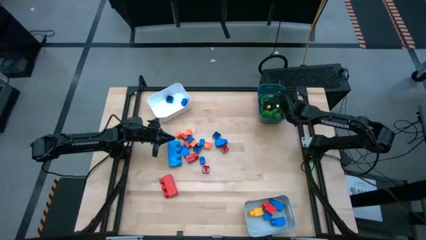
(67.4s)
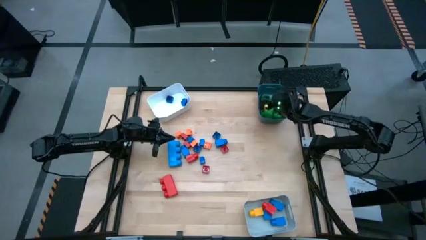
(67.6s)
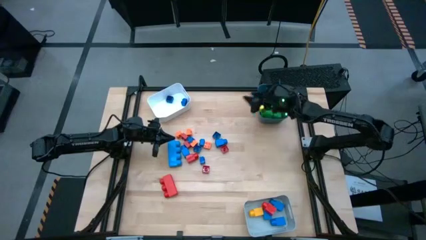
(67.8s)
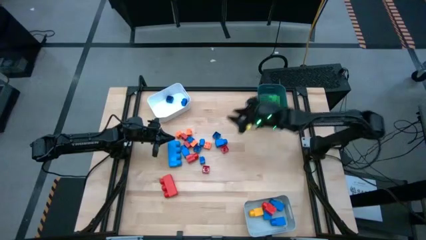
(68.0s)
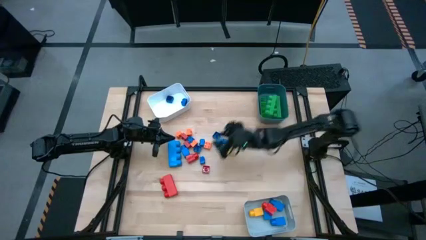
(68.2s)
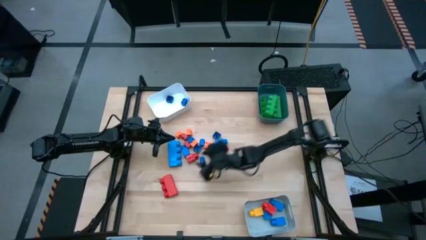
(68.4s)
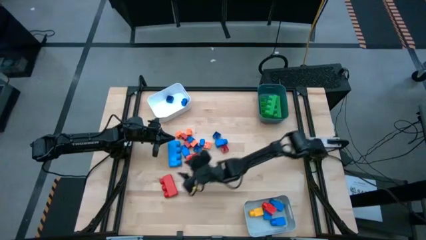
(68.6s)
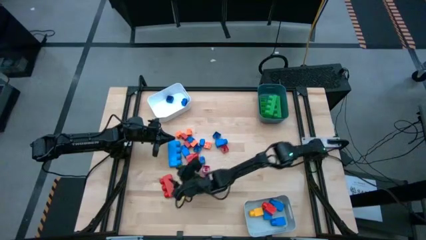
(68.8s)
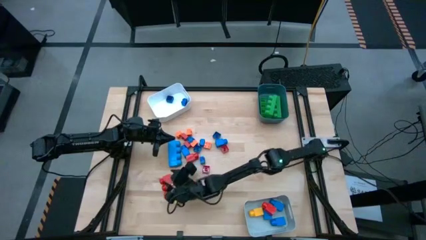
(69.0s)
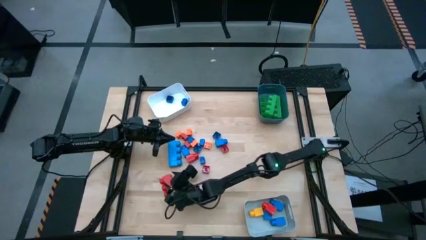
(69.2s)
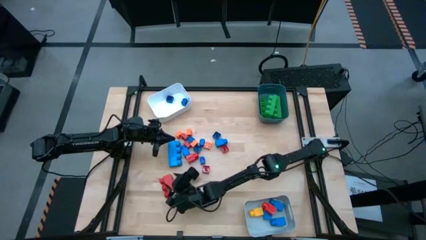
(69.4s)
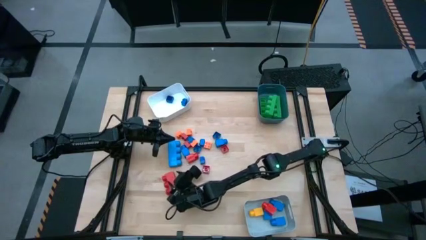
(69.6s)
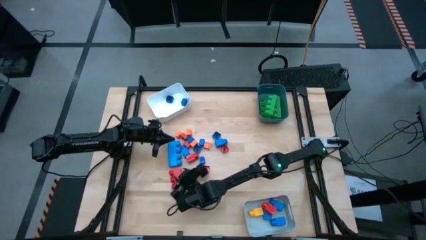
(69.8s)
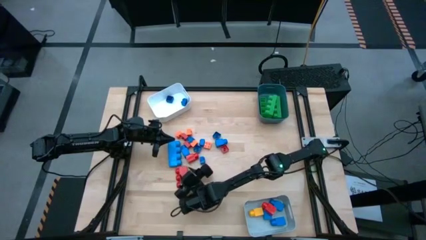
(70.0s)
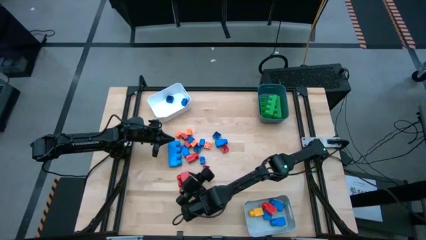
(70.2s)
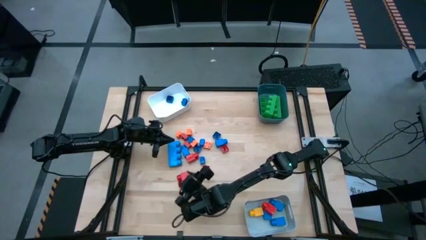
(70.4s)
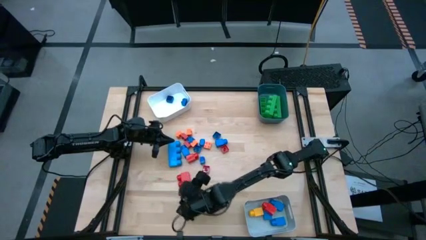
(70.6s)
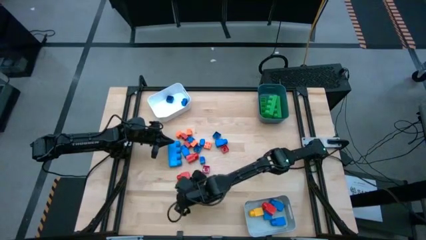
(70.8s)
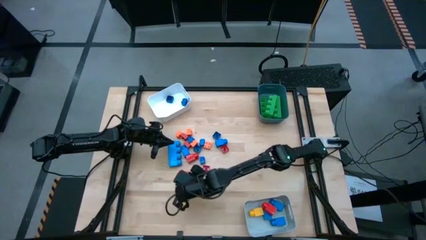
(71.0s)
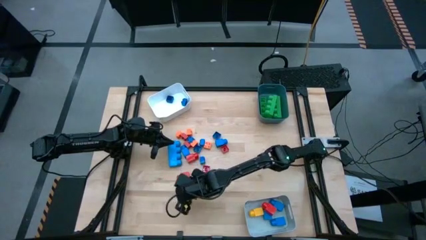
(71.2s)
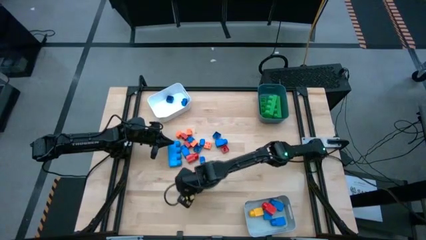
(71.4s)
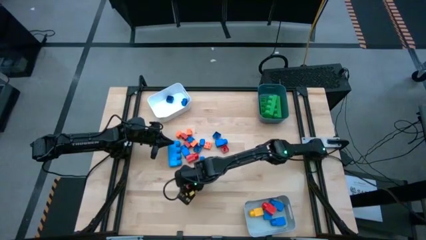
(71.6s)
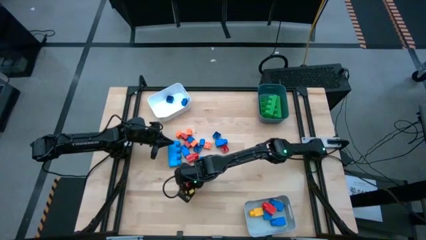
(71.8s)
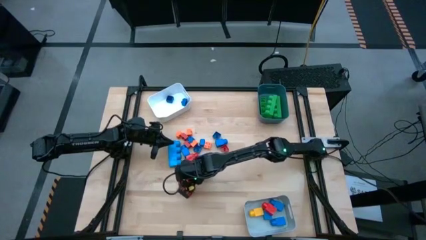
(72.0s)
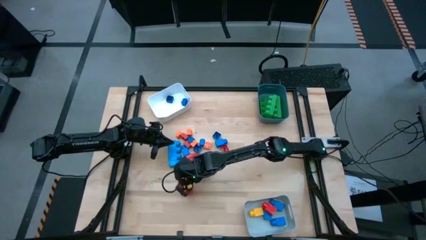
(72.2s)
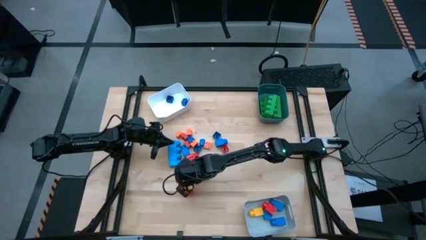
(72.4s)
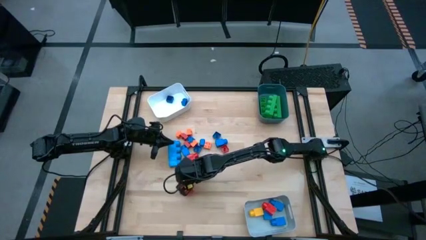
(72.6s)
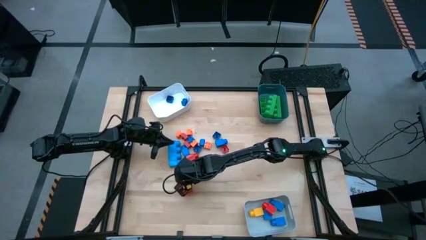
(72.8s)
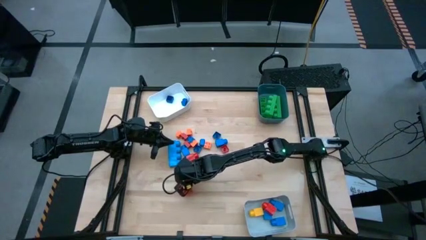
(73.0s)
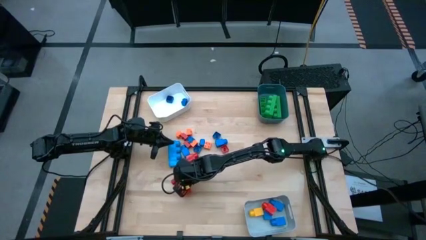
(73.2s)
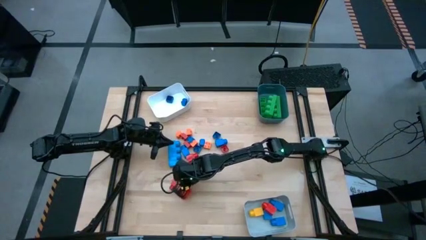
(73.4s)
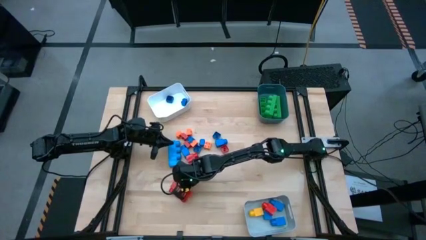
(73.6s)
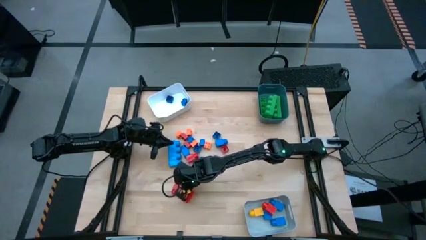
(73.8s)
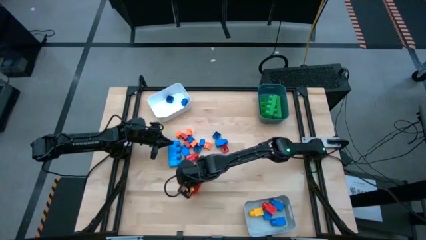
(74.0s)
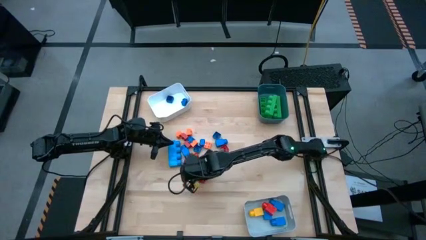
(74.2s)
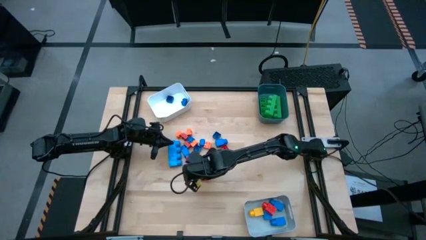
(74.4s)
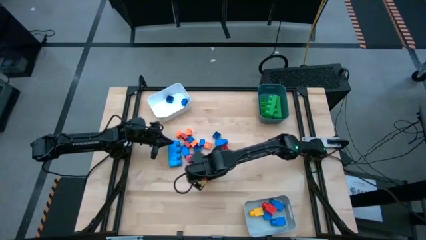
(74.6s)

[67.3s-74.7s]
Task: Sort blocks by size
Put the large 4 stud red game piece into the blue bin

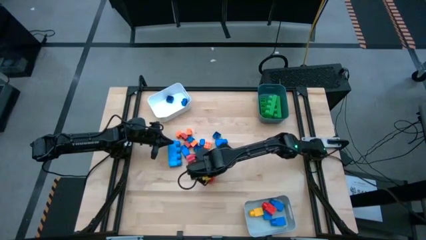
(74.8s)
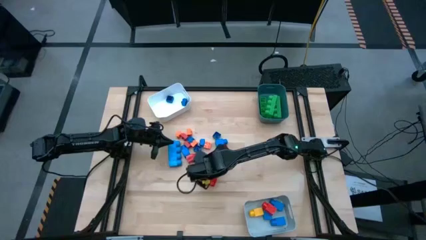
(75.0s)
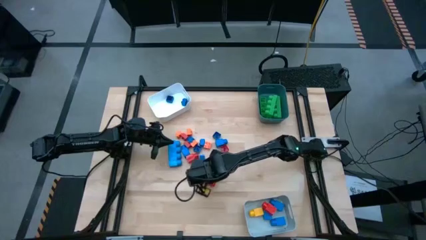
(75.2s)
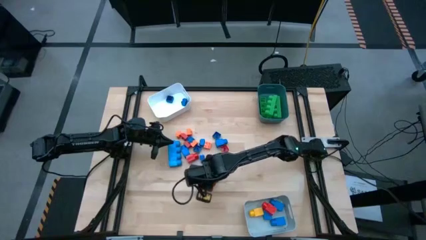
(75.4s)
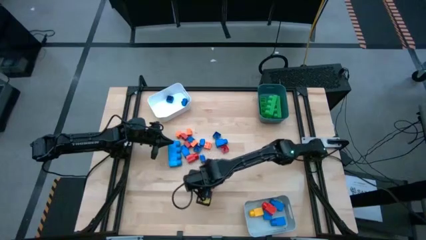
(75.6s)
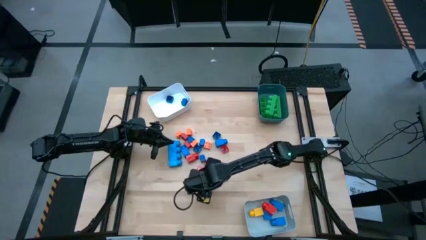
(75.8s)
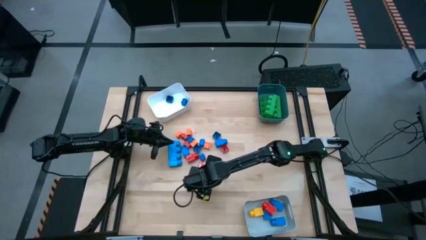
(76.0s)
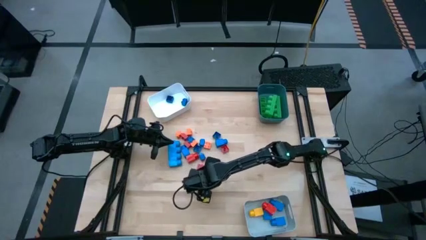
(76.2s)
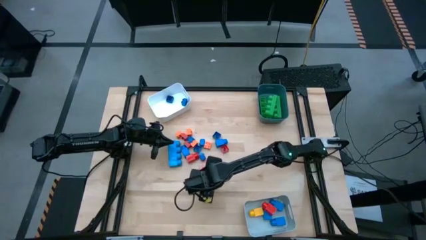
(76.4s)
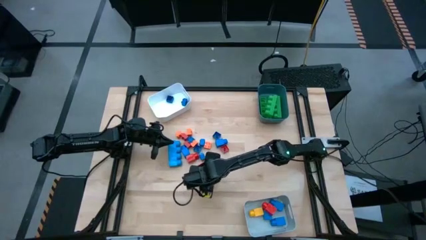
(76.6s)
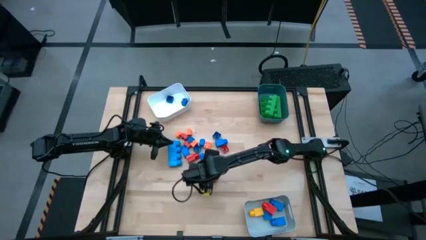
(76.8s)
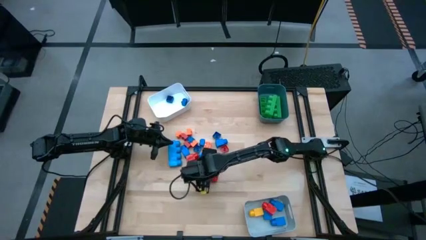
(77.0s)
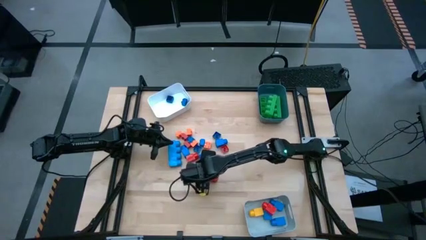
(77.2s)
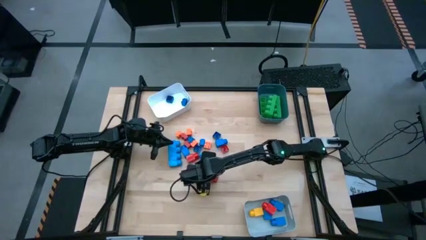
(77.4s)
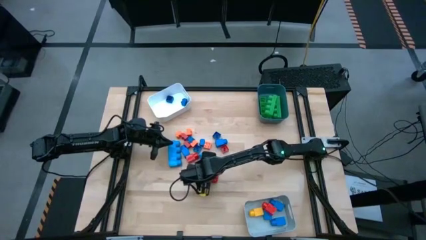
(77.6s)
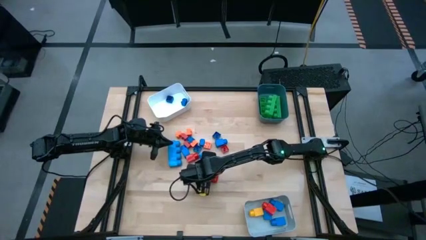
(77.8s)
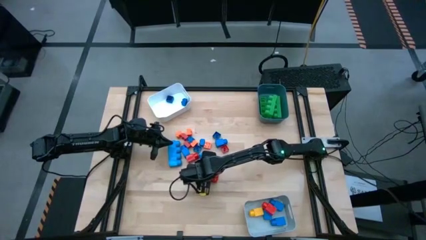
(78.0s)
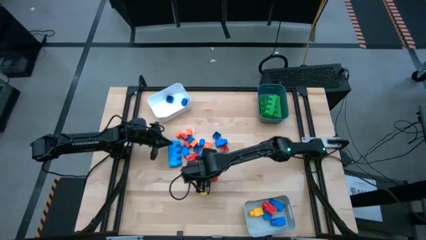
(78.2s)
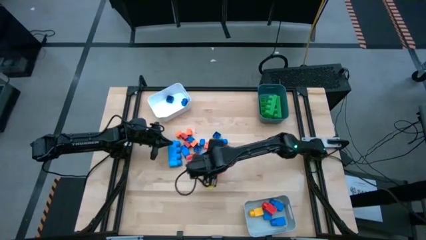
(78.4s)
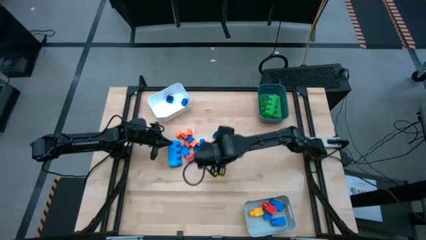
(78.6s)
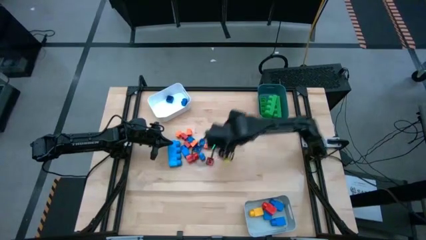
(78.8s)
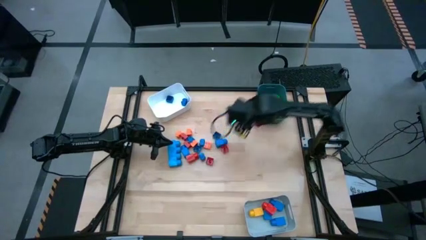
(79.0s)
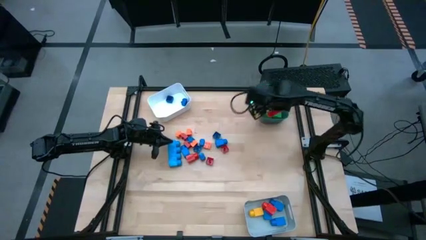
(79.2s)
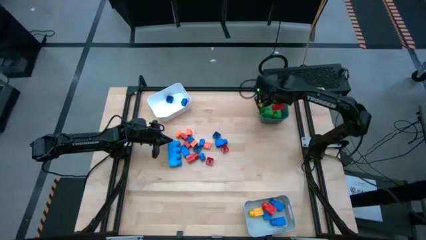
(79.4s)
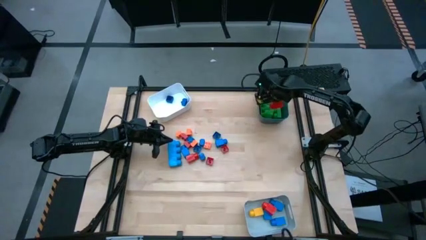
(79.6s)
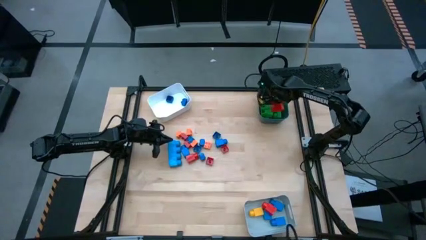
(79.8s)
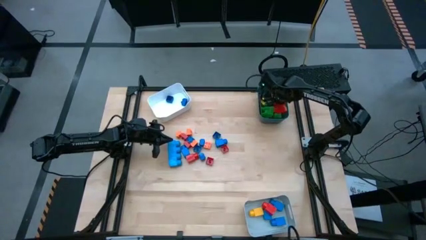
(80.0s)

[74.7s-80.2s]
Put the large 3 stud red game piece into the blue bin

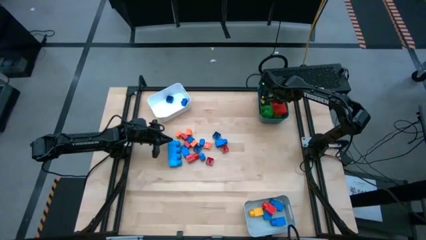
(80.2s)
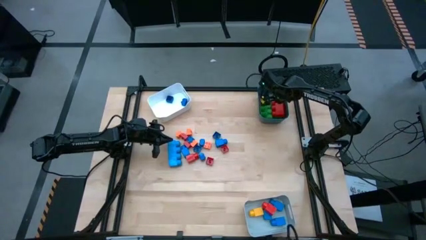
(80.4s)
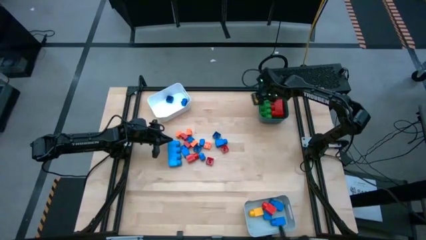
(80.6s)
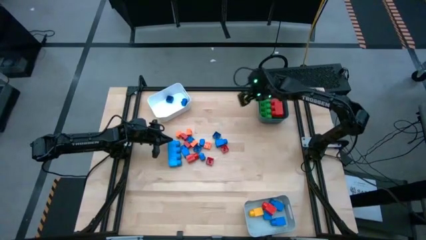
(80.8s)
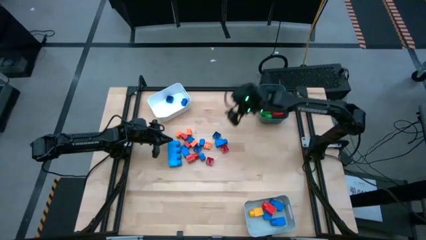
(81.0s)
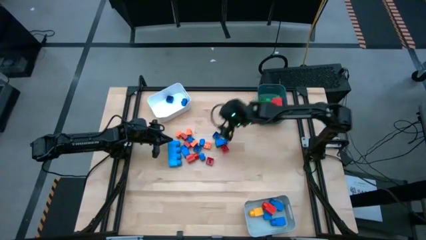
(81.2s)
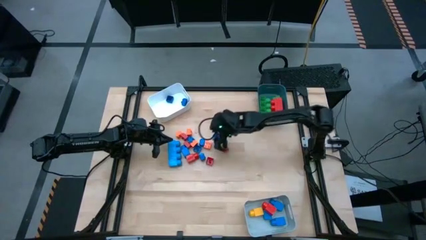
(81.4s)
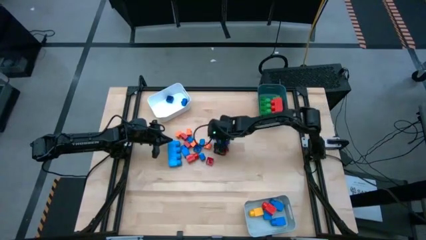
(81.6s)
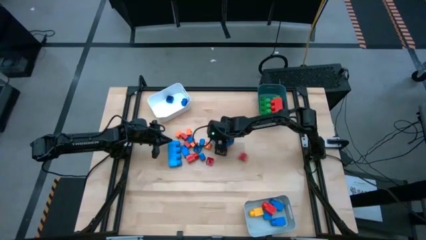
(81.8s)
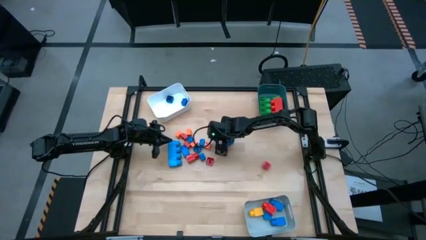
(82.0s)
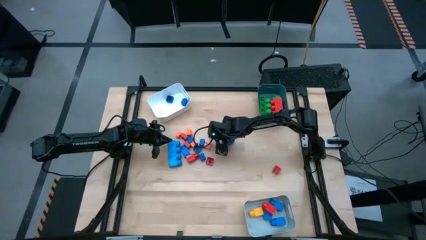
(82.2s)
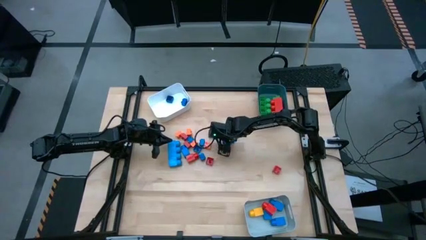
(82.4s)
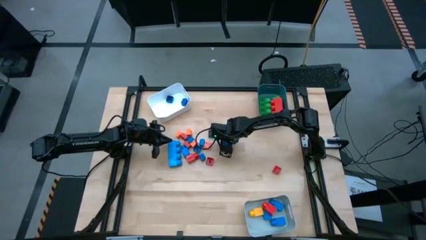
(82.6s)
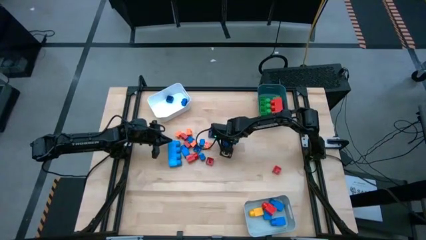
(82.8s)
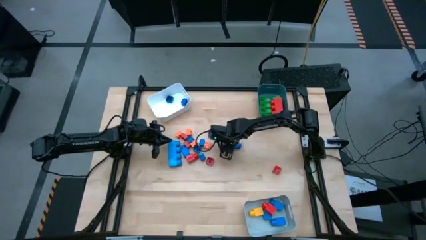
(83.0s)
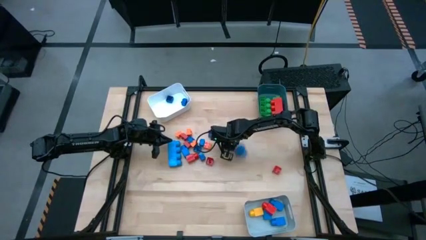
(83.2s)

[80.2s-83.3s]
Put the 1 stud blue game piece into the gray bin

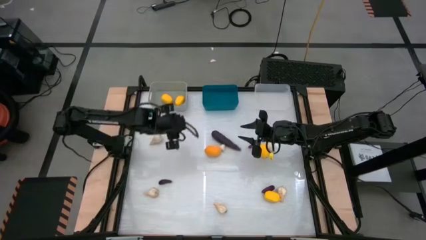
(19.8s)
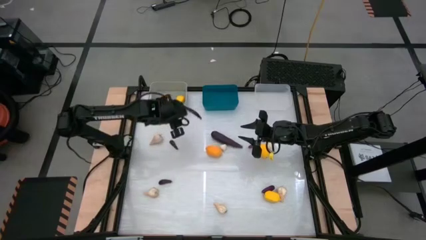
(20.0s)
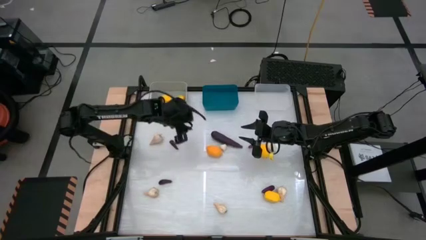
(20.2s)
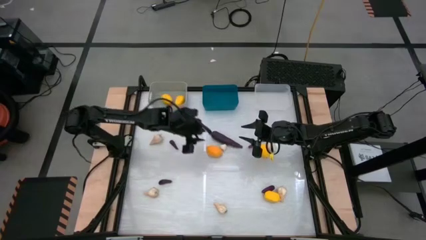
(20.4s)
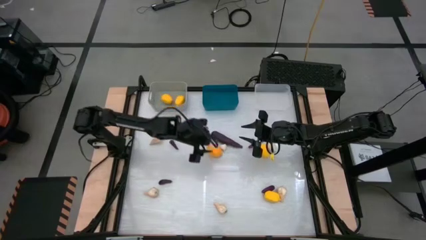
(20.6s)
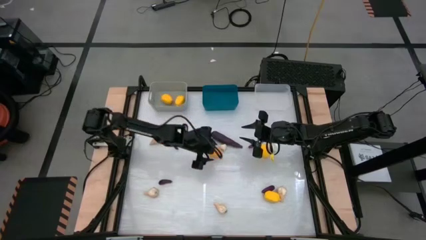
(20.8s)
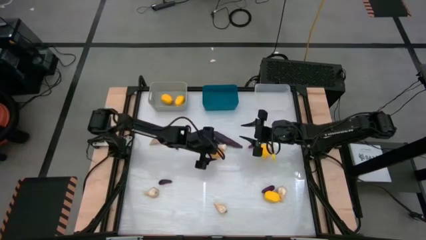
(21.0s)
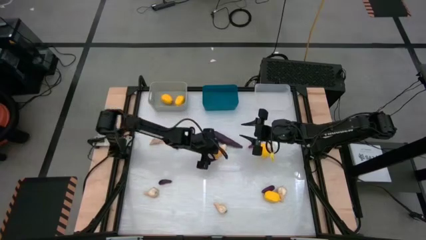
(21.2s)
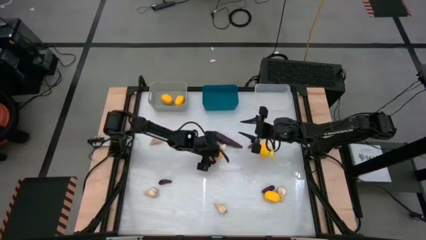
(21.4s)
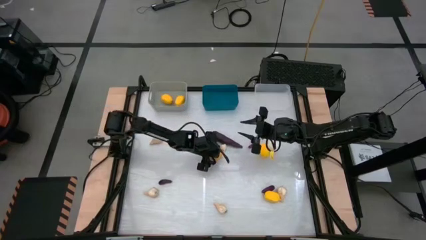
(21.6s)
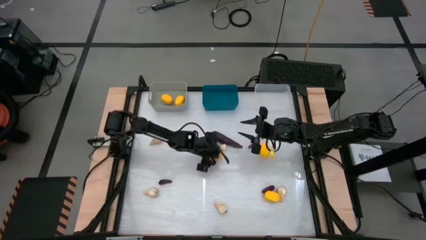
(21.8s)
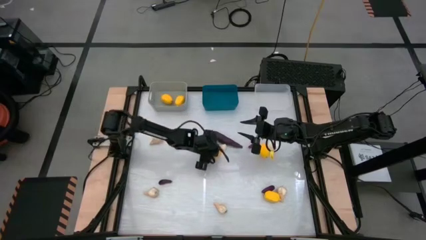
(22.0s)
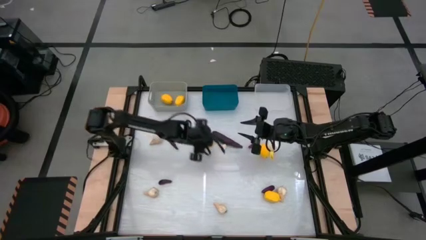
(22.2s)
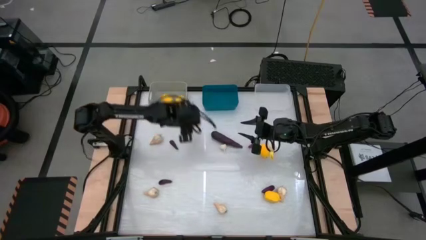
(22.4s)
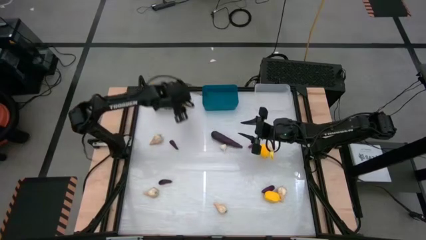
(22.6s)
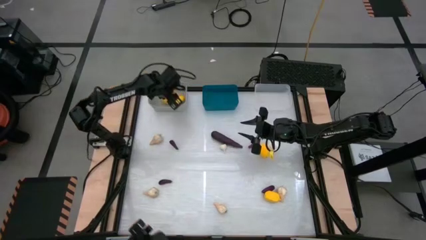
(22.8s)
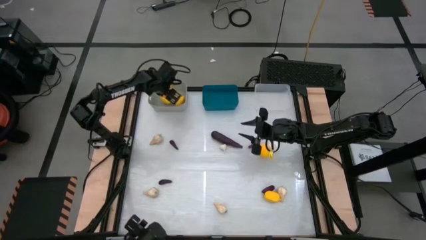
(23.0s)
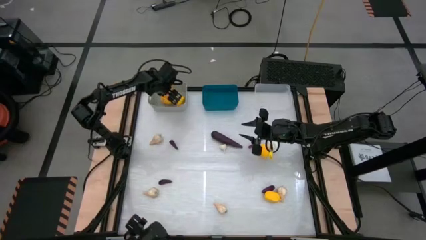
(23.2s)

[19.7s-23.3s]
Task: Sort produce into baskets
Put the bottom left lemon into the gray bin
